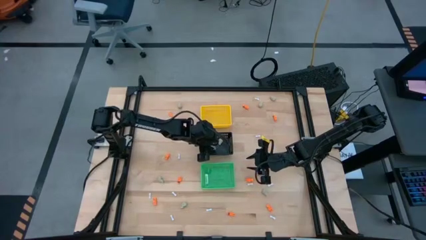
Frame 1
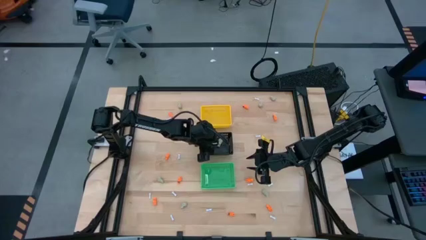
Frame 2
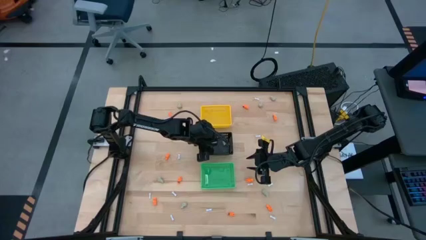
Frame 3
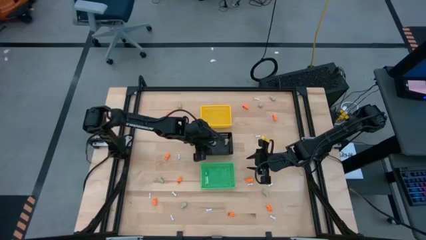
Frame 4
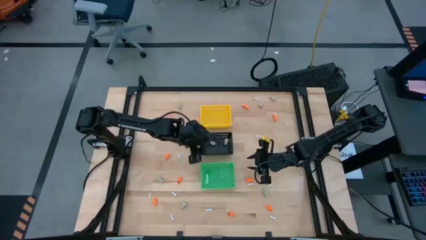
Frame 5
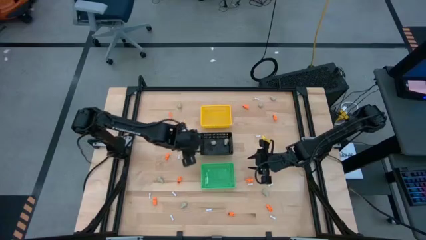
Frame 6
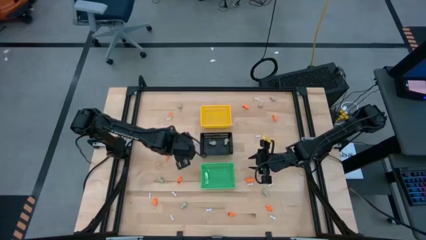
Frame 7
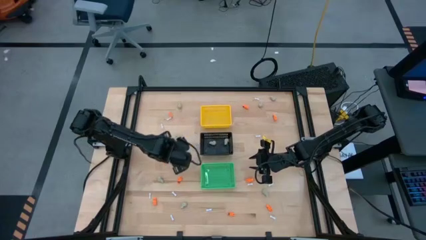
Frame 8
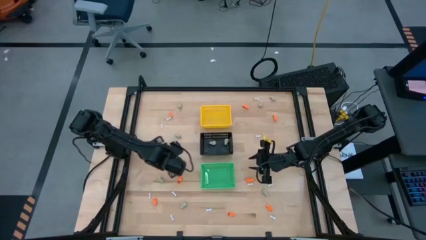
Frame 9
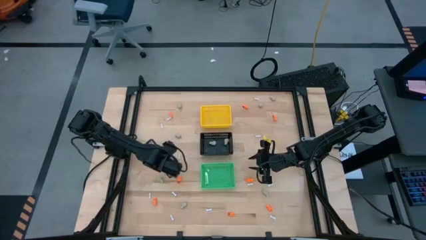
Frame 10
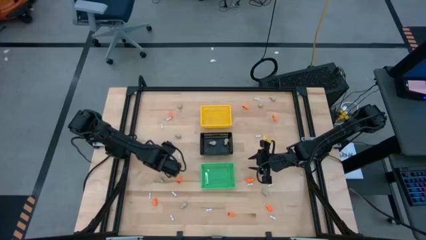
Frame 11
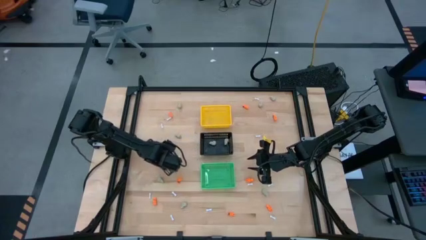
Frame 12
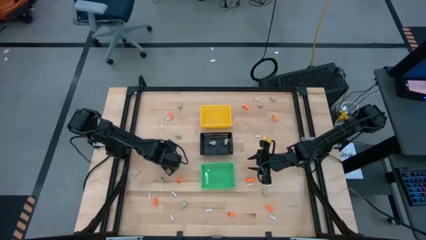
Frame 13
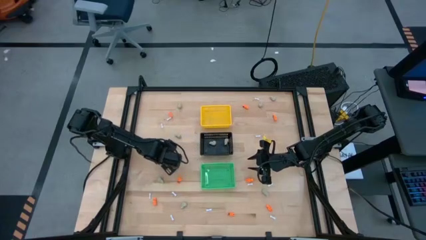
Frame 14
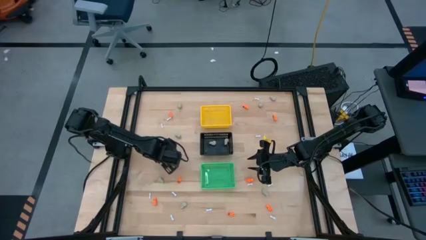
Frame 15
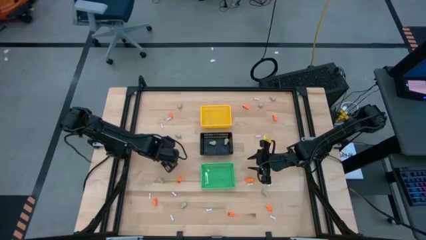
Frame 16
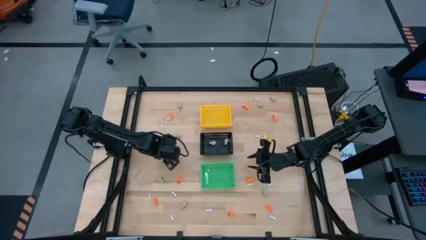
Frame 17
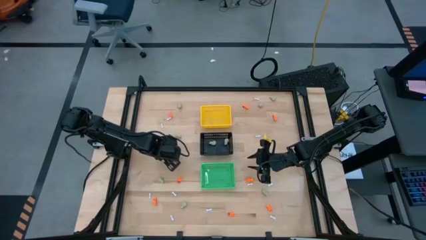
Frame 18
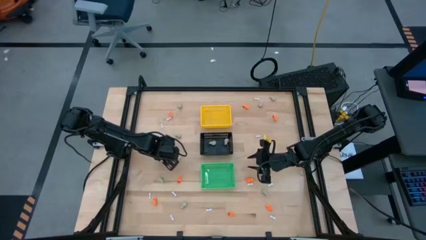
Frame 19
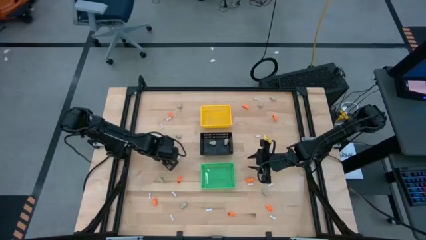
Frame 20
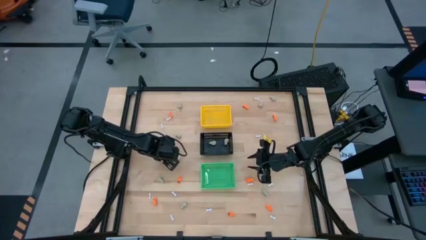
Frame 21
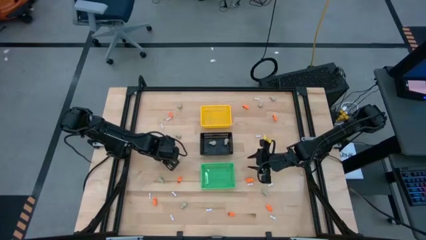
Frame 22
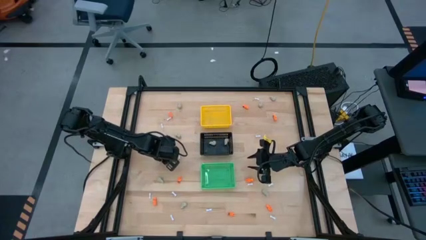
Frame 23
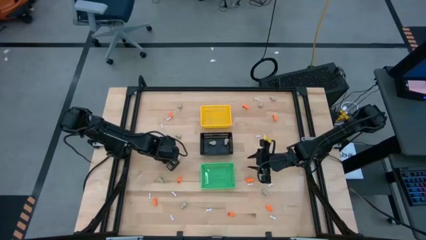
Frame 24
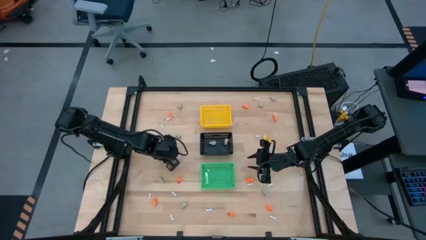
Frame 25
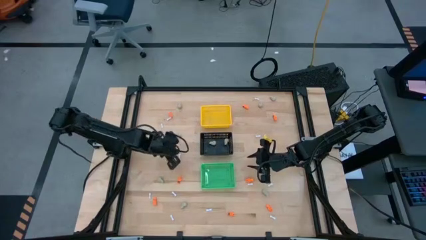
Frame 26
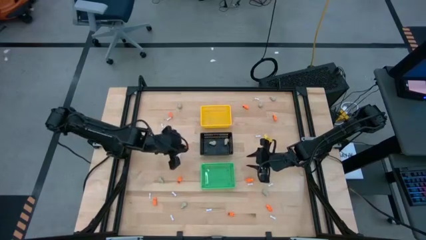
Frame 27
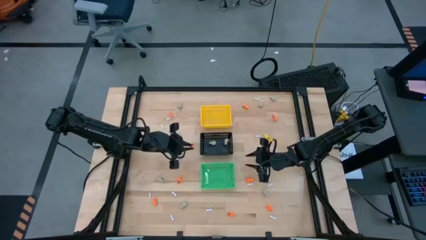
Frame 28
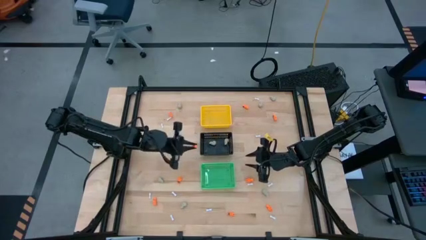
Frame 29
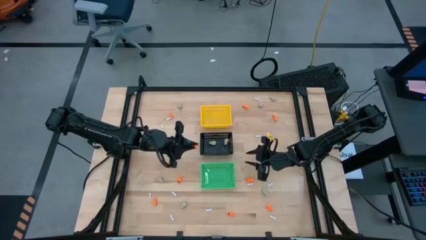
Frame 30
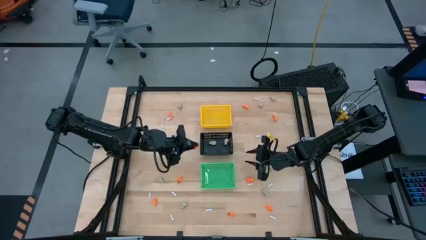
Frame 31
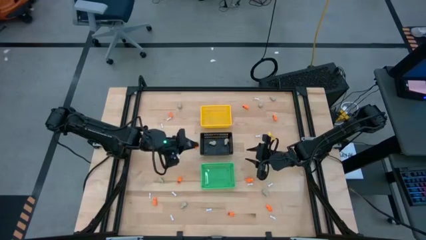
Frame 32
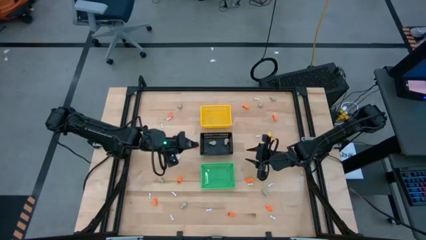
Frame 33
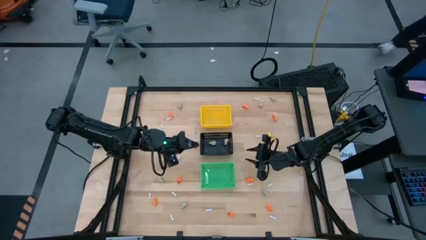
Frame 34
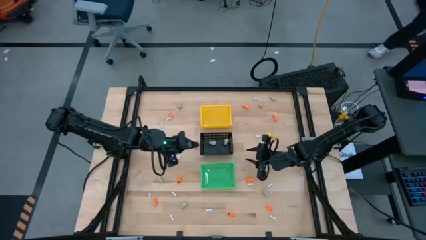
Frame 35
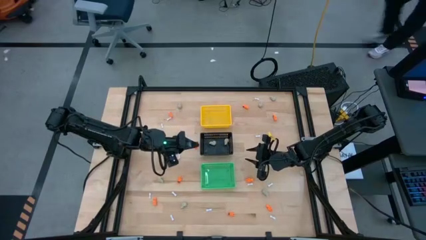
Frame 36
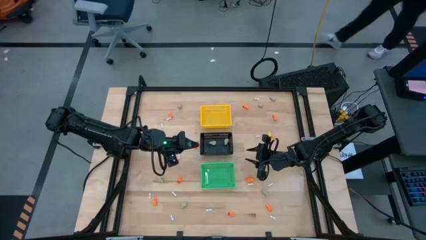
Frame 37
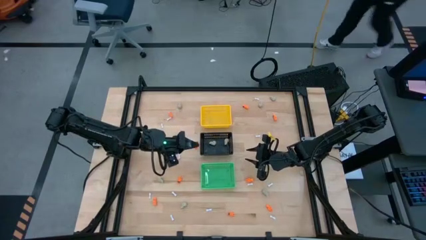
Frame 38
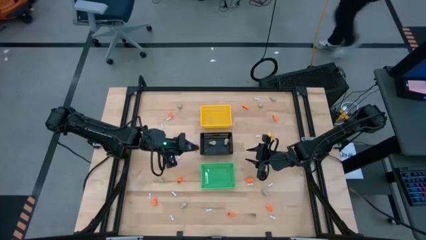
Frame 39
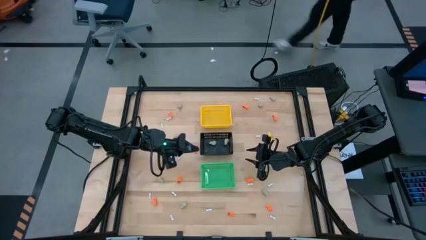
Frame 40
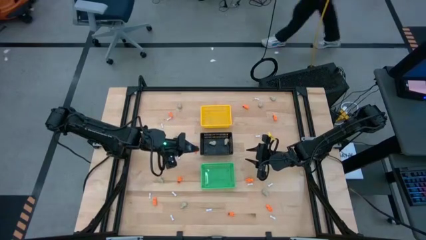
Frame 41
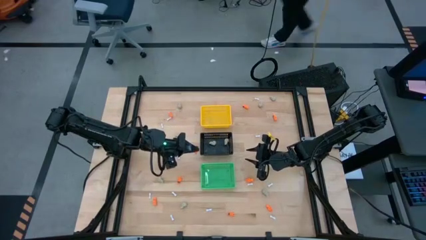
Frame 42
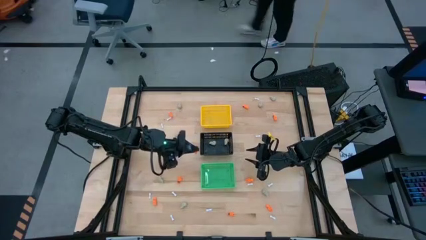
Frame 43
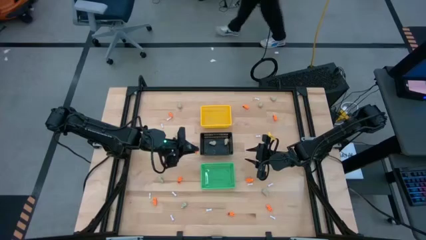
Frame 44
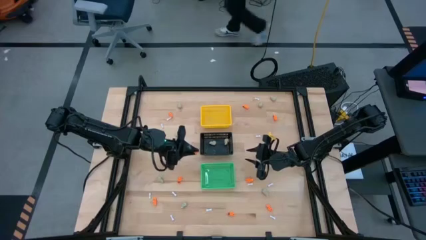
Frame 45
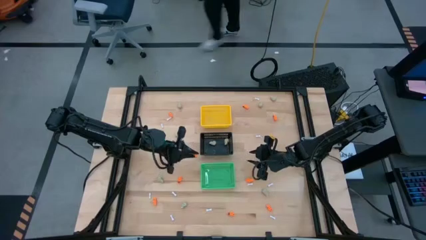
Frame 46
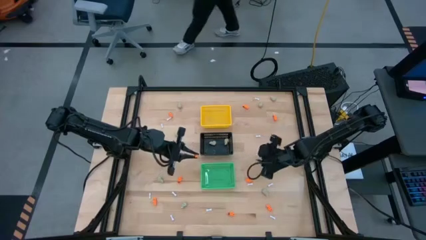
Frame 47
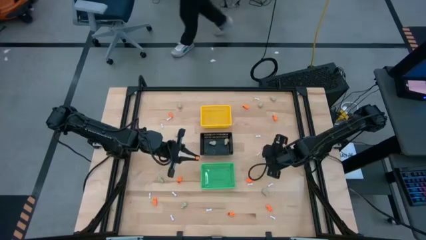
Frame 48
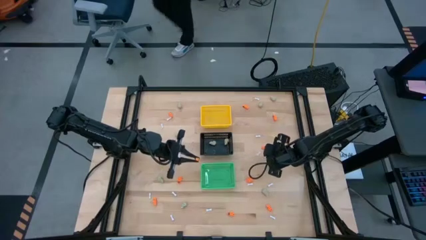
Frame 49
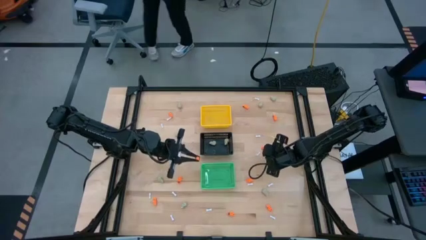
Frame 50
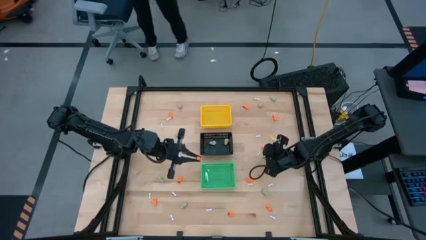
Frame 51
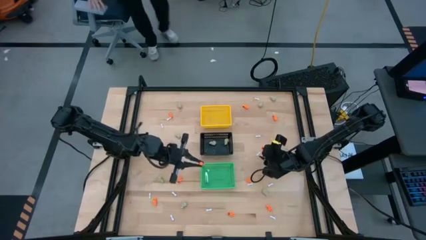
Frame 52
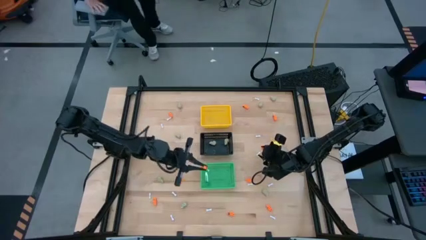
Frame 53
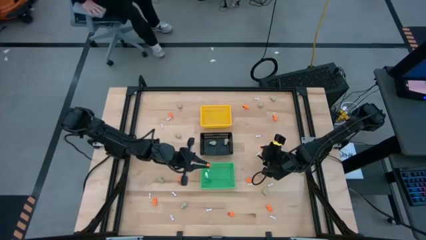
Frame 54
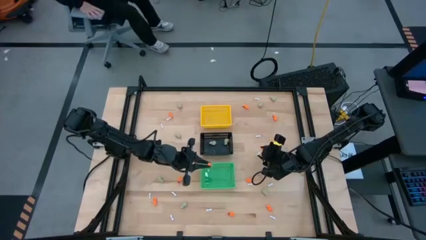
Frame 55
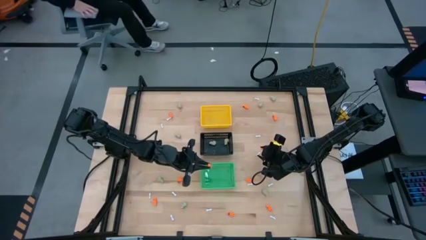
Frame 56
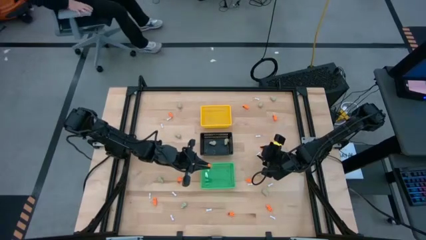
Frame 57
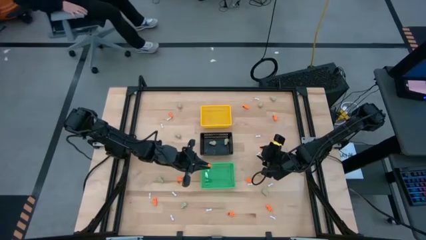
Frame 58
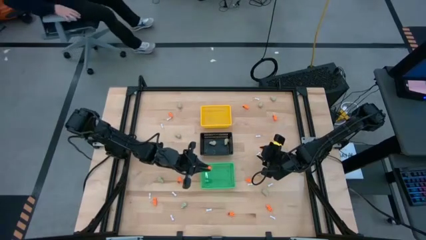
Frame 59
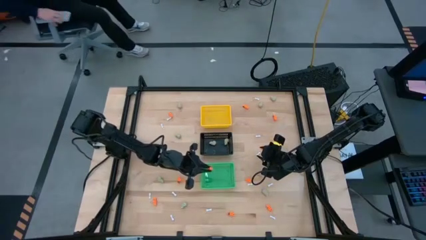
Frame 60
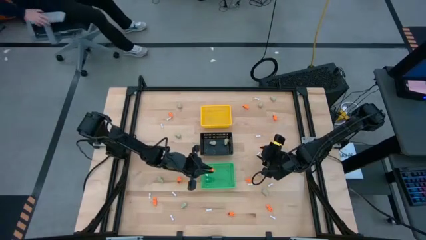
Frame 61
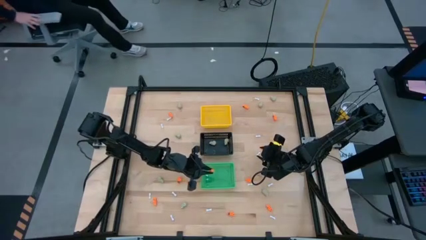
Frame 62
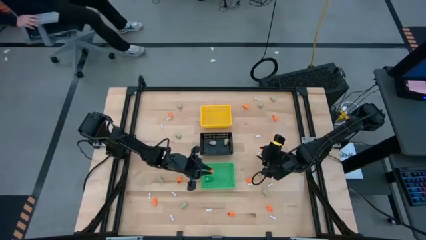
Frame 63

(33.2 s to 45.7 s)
Task: Sort Halloween decoration
Put the orange skeleton toy into the green basket
